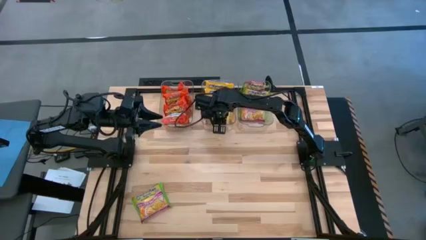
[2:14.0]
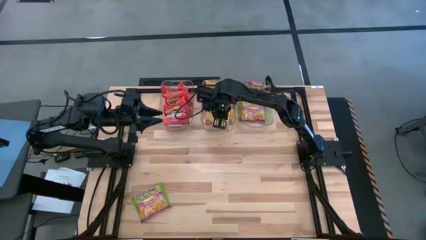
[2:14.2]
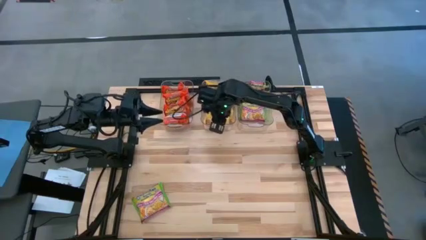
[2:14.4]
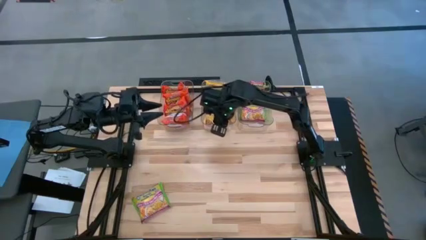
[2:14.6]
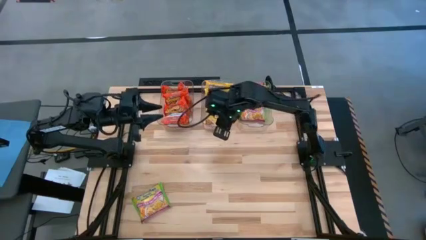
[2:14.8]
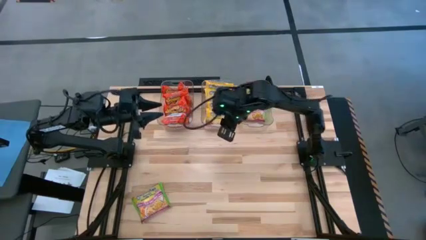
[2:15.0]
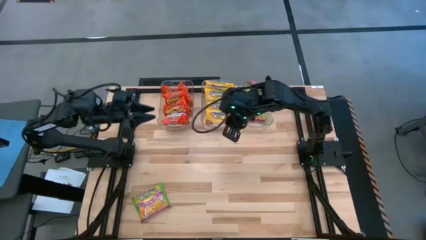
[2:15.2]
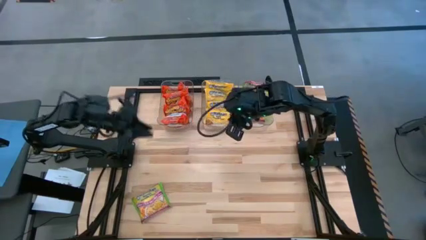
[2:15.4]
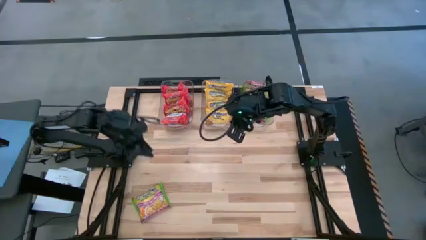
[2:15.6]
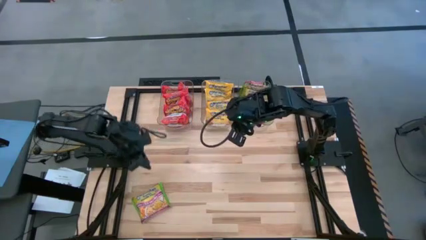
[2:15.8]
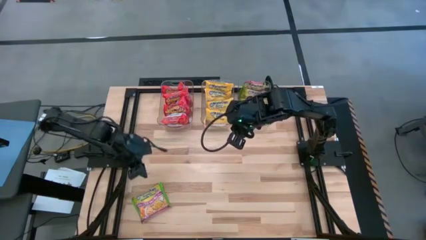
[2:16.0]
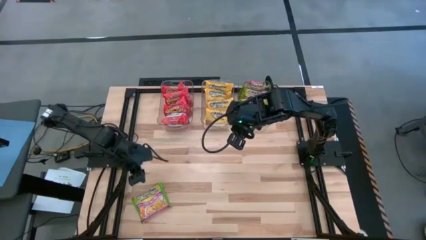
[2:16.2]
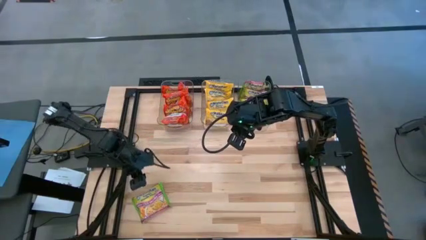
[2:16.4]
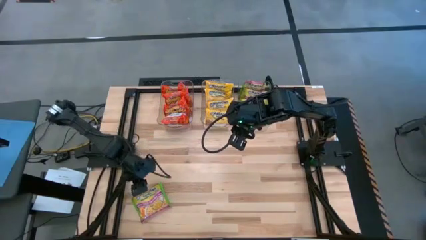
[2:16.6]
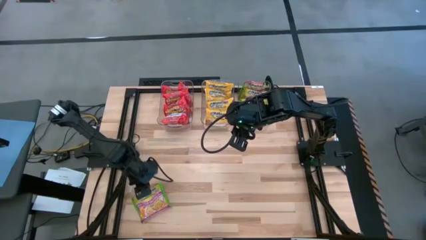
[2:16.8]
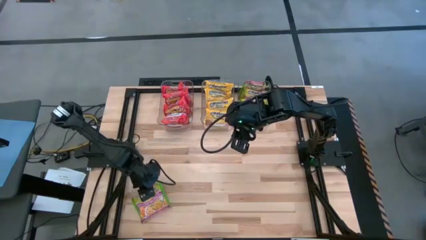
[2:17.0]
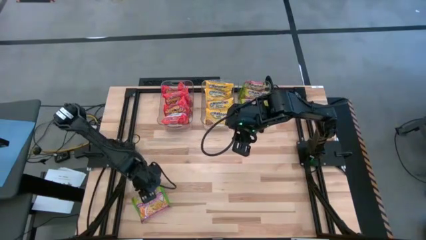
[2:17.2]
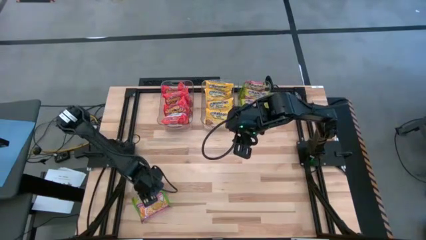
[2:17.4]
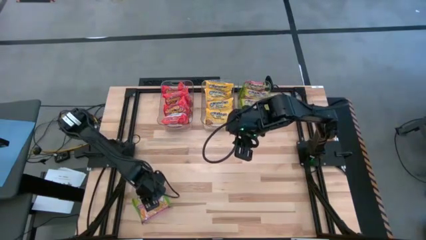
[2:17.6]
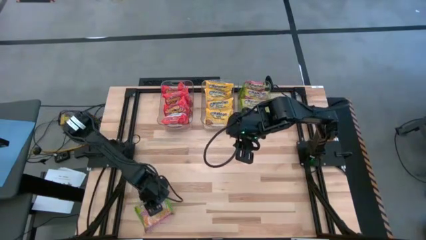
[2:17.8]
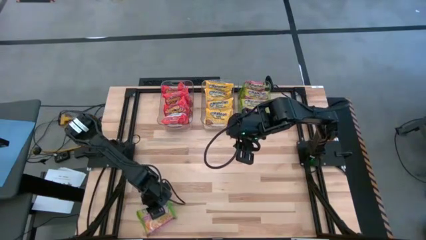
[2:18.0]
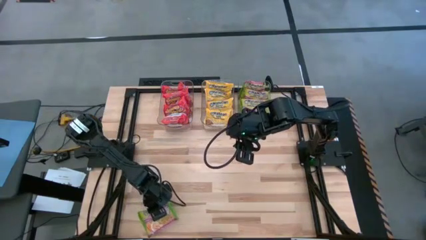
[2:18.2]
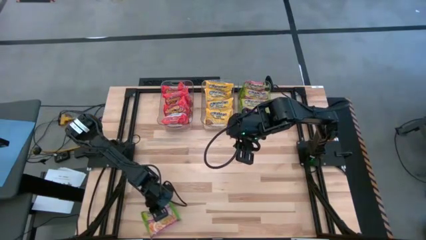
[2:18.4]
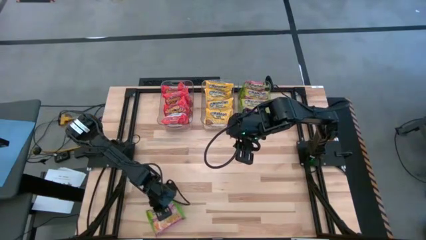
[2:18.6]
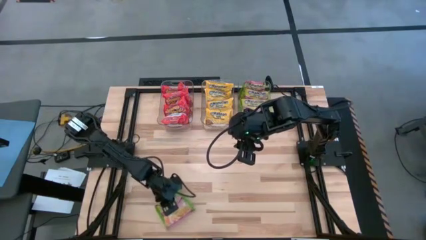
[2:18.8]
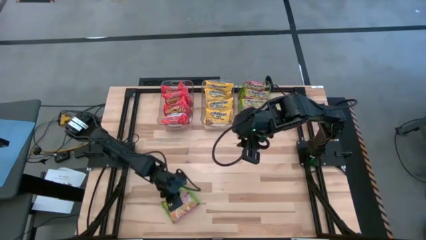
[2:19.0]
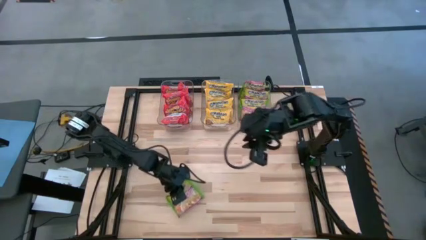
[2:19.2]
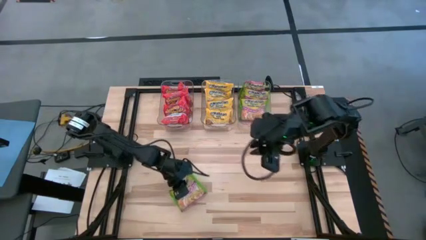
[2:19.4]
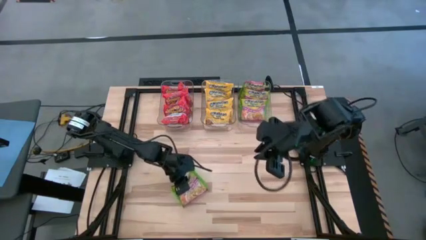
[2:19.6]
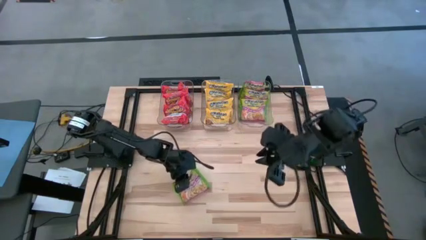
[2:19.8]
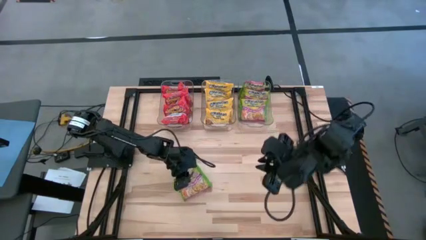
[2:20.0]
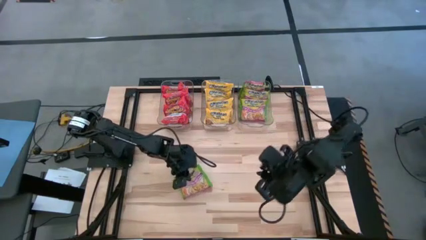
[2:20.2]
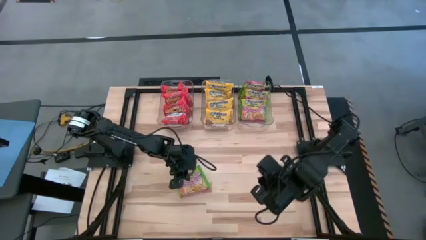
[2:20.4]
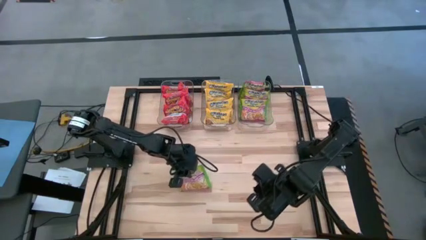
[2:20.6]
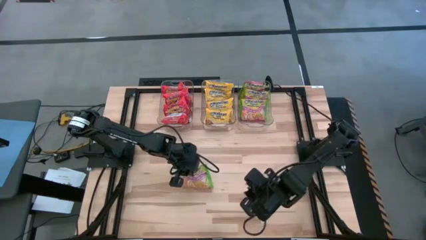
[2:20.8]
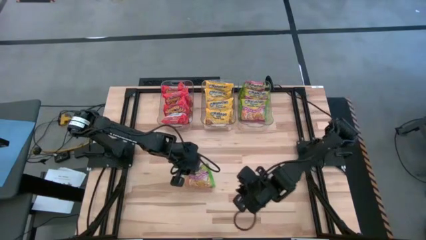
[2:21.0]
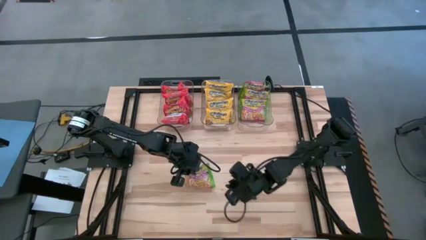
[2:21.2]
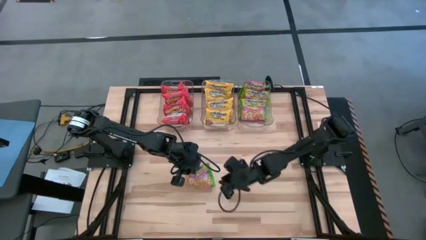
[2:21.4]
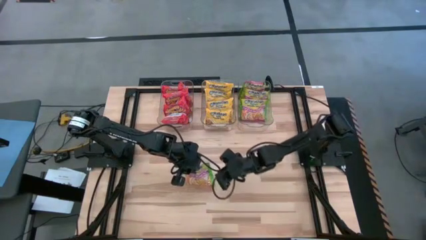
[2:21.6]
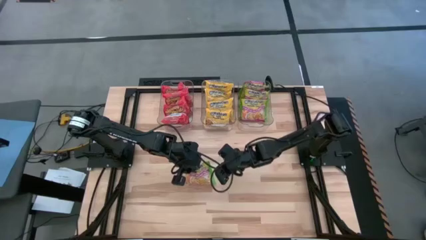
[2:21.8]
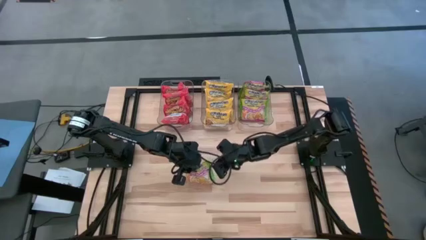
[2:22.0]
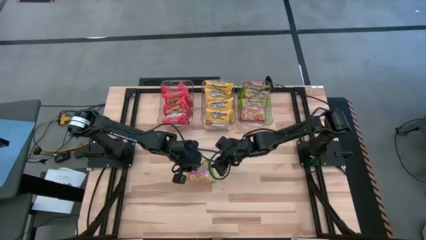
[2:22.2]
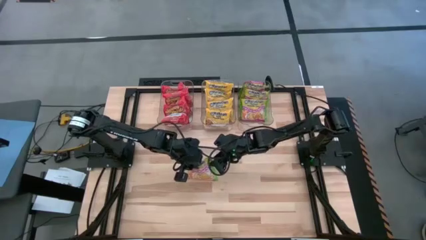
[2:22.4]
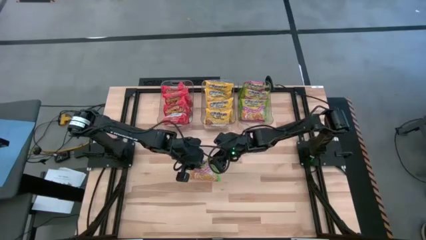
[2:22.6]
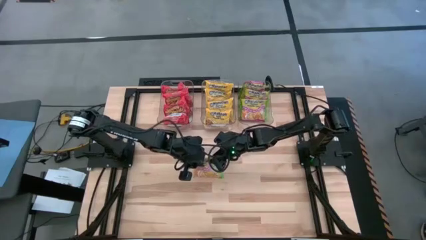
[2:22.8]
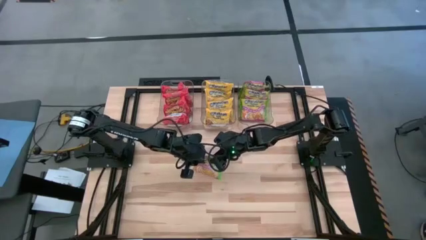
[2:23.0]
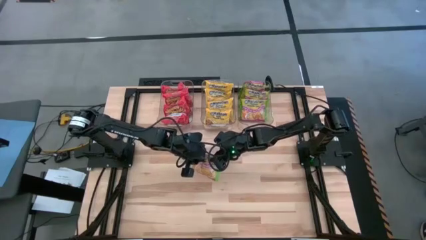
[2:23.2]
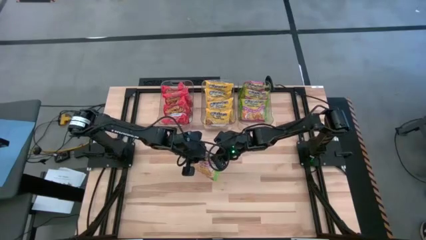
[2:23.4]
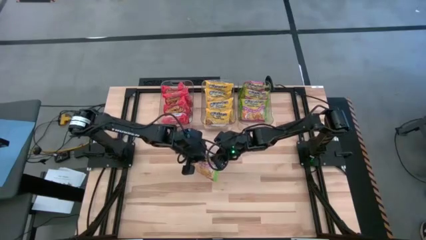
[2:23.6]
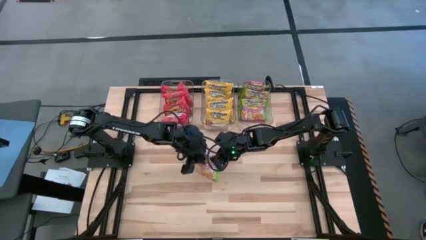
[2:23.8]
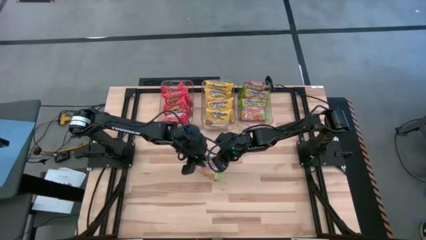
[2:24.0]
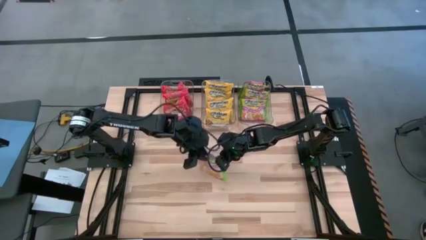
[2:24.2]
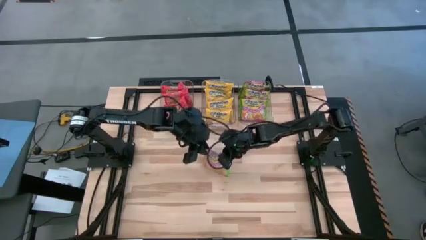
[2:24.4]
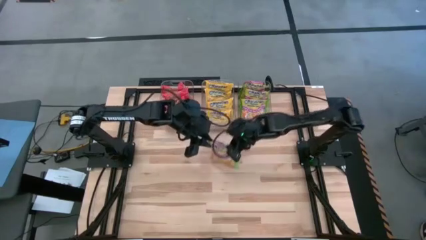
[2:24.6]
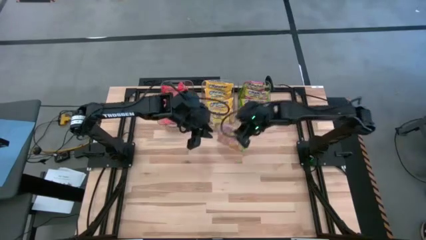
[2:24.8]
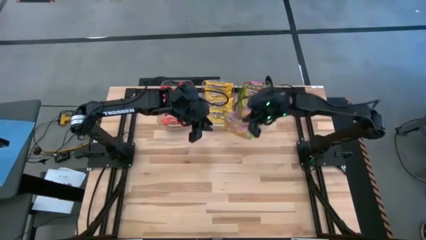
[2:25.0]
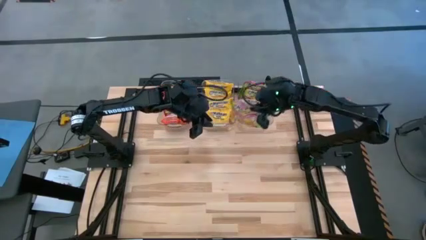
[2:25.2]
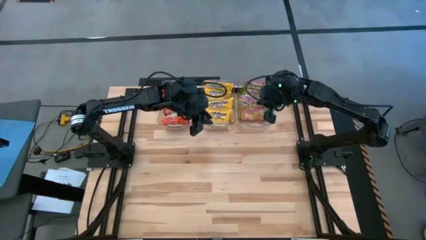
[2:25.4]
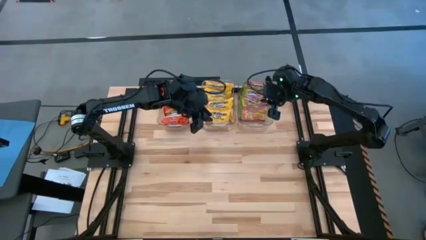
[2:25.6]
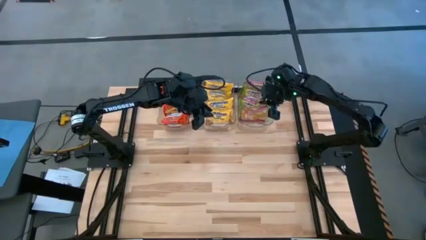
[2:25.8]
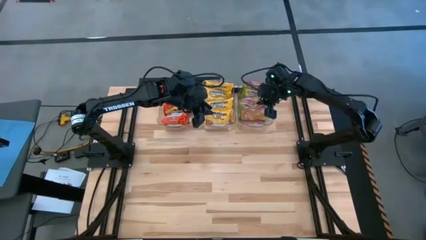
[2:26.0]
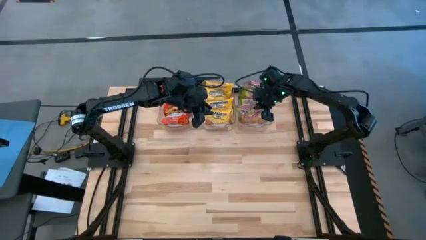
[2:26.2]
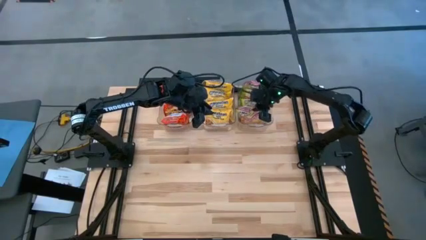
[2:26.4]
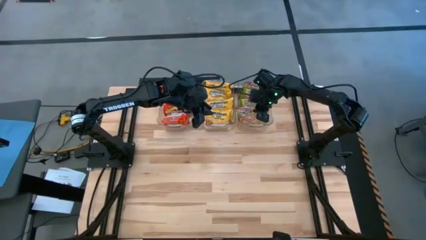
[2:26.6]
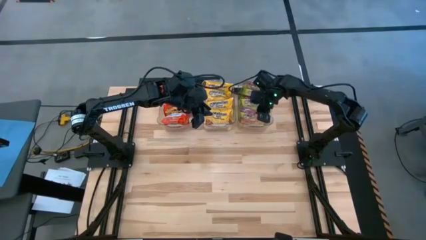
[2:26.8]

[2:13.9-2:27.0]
Task: Sort Maruchan noodles
Put the green noodle pack into the right transparent bin

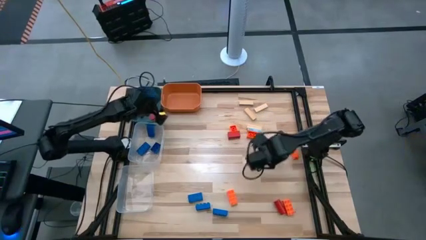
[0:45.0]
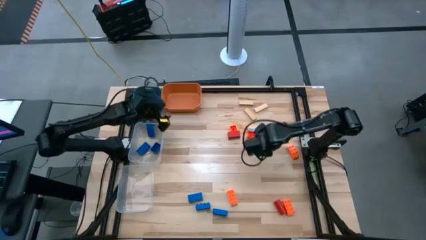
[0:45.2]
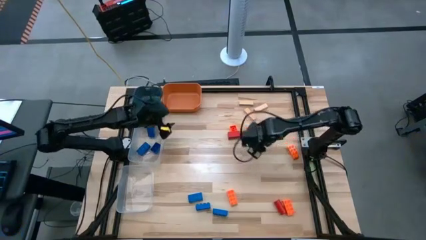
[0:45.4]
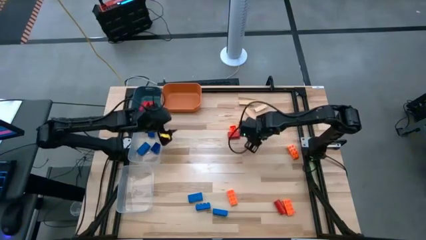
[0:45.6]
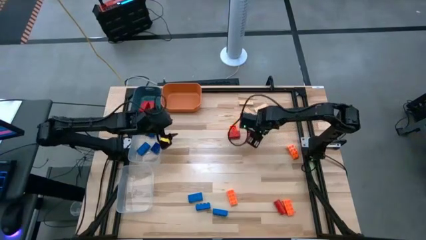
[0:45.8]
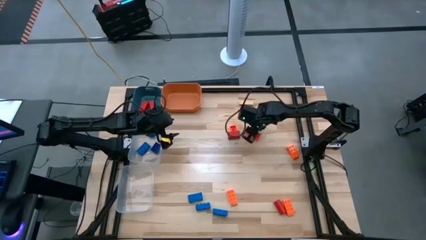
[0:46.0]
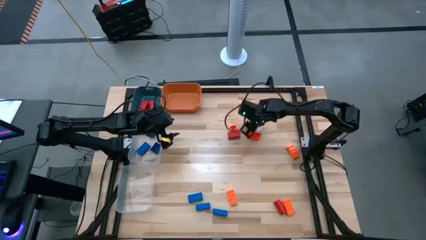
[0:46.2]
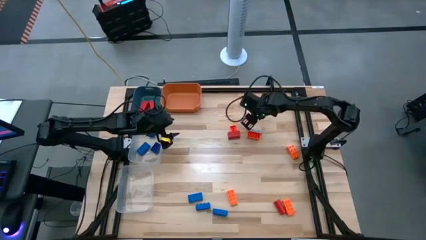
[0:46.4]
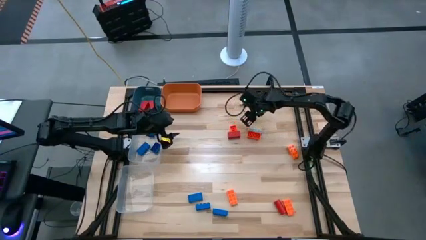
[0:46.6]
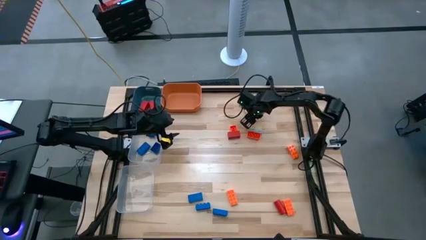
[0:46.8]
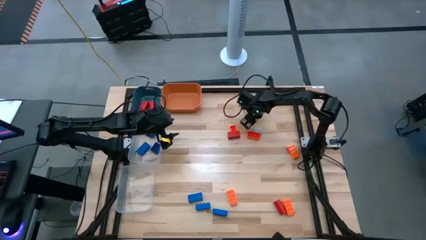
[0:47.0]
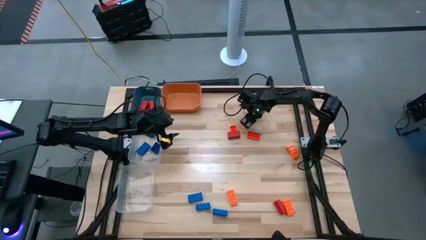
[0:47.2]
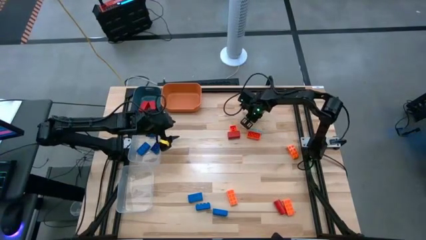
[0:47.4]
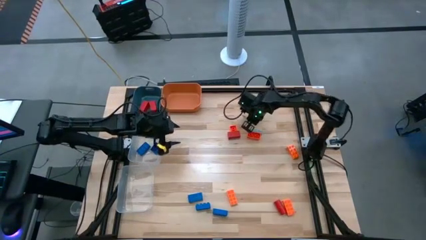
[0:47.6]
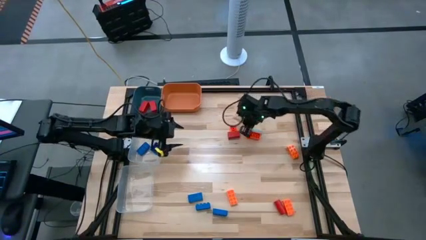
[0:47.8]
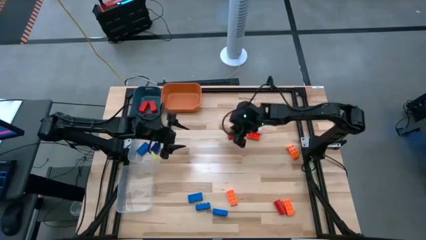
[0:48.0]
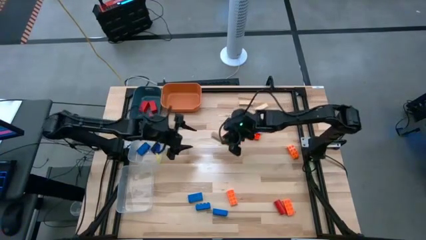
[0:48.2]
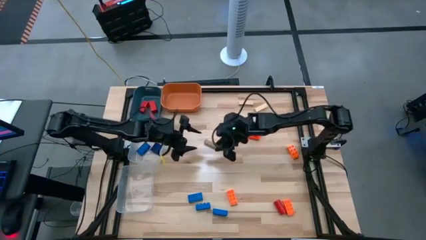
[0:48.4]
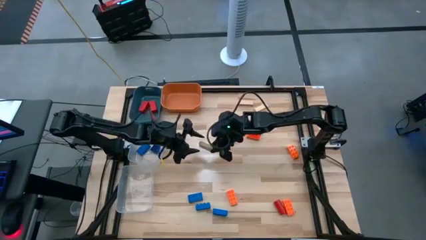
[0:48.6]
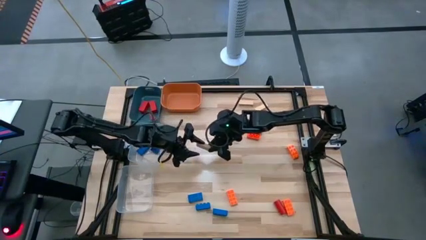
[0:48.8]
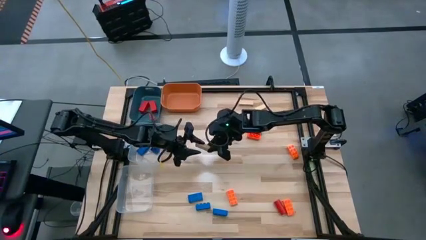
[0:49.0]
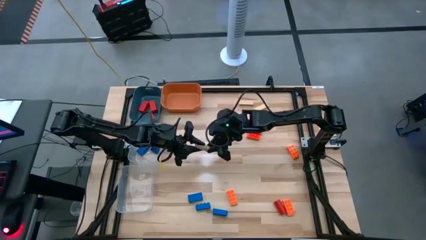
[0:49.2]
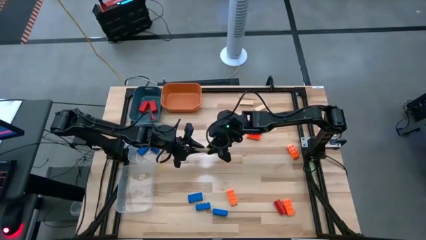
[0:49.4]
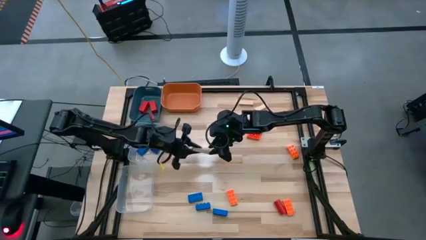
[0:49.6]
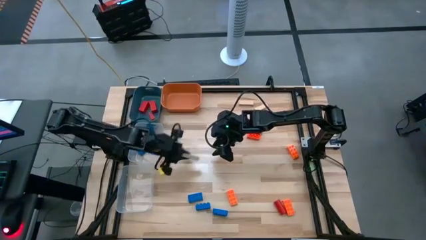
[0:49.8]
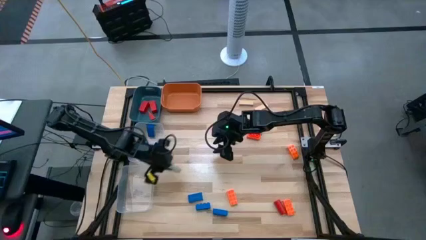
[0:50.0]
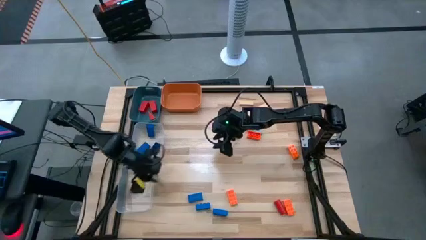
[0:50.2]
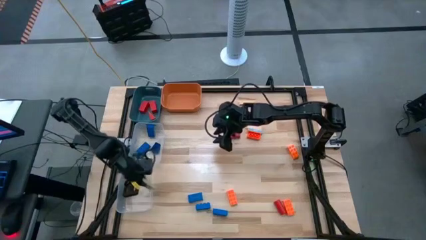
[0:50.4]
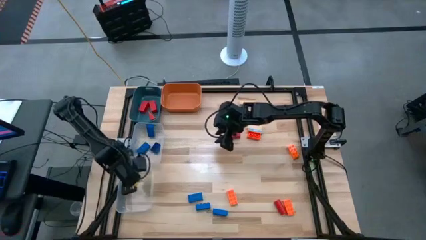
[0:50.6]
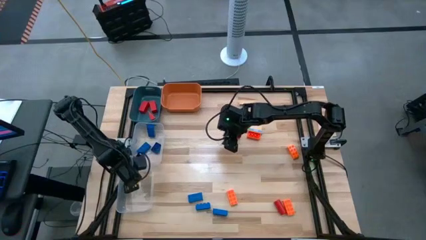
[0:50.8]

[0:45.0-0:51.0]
Task: Sort blocks
Put the wooden brown block into the bottom transparent bin
